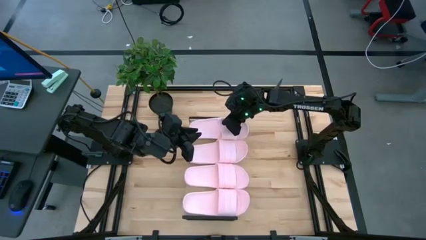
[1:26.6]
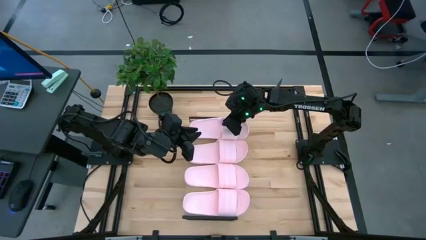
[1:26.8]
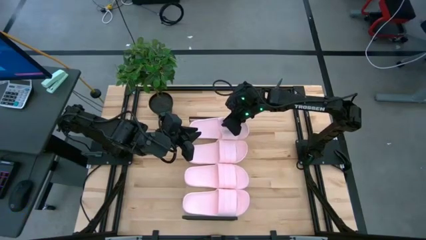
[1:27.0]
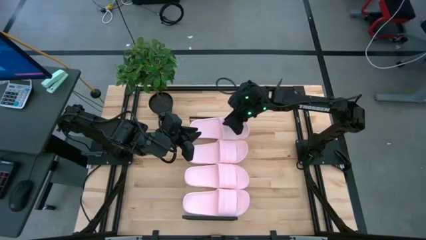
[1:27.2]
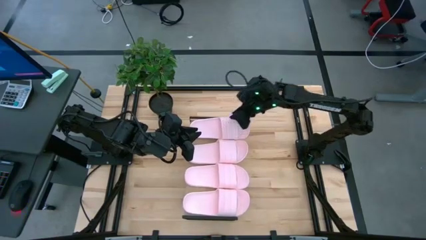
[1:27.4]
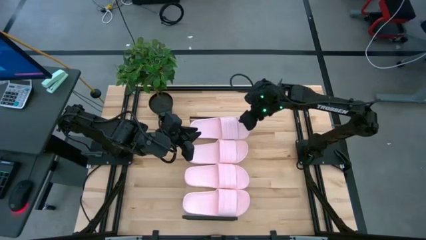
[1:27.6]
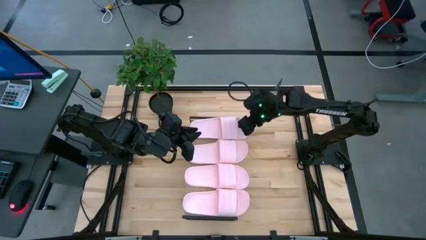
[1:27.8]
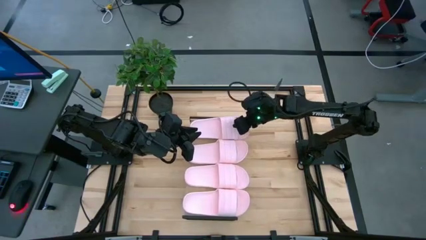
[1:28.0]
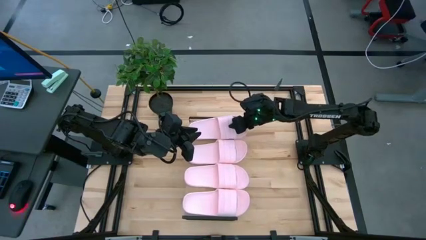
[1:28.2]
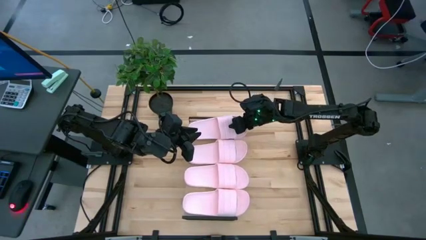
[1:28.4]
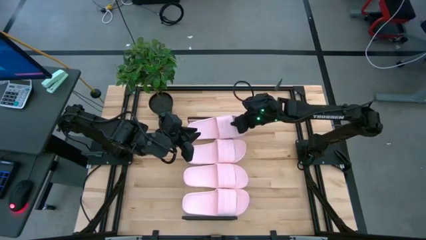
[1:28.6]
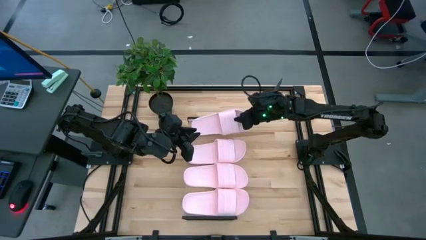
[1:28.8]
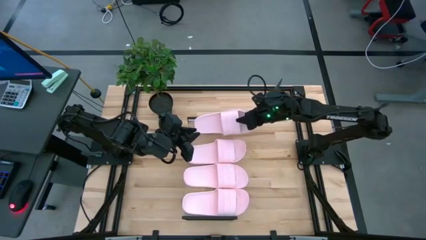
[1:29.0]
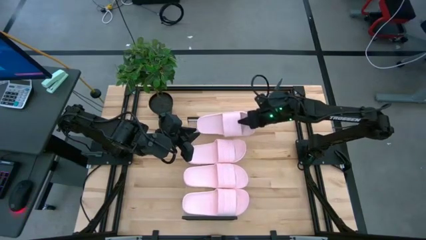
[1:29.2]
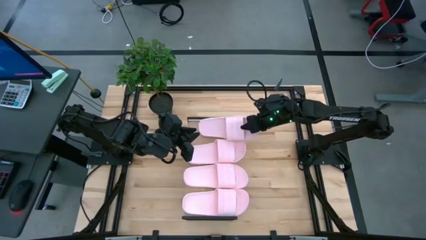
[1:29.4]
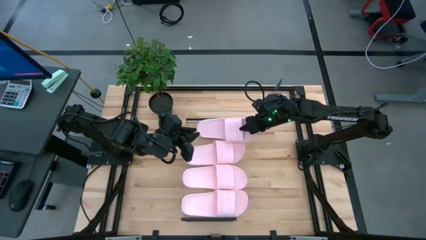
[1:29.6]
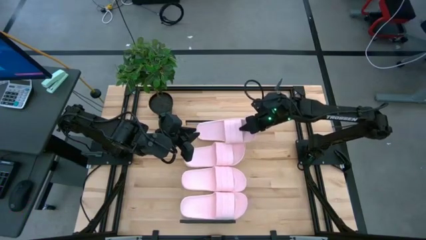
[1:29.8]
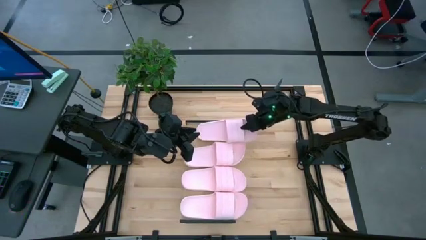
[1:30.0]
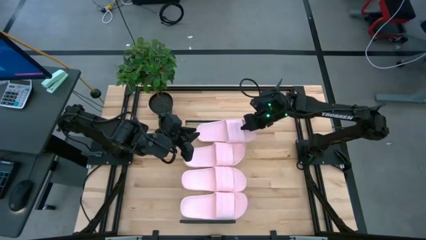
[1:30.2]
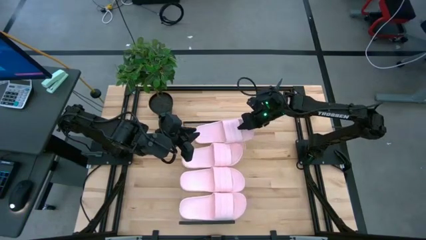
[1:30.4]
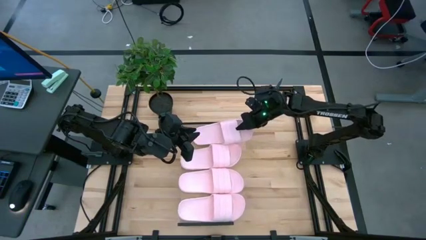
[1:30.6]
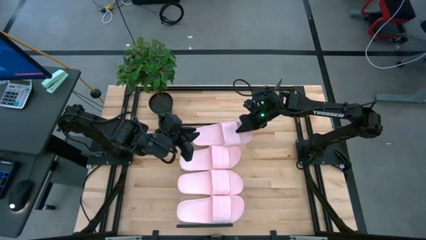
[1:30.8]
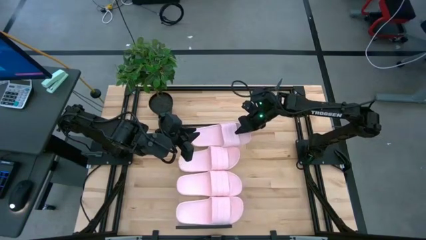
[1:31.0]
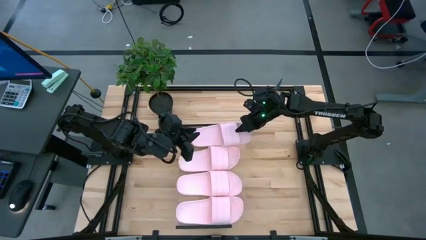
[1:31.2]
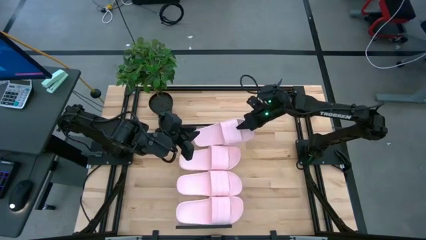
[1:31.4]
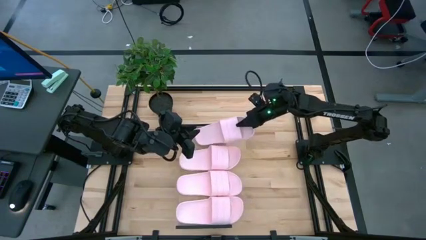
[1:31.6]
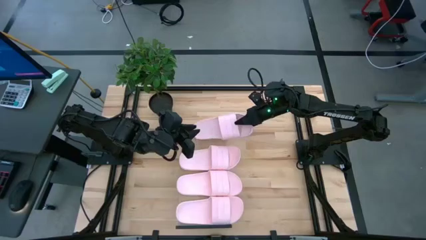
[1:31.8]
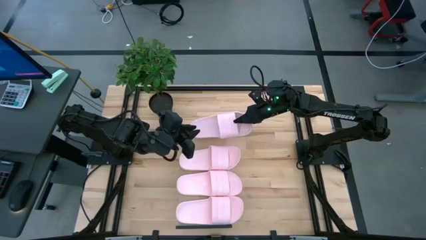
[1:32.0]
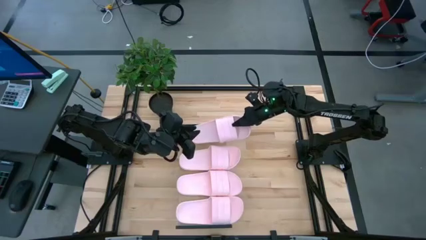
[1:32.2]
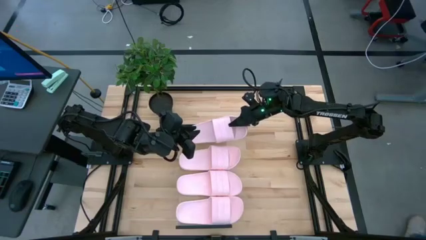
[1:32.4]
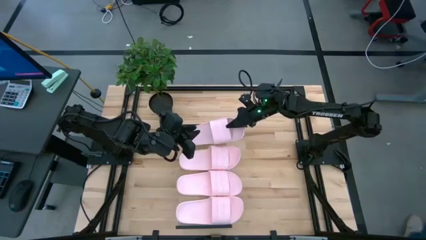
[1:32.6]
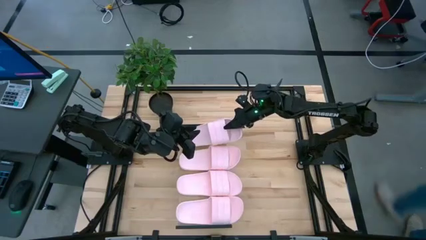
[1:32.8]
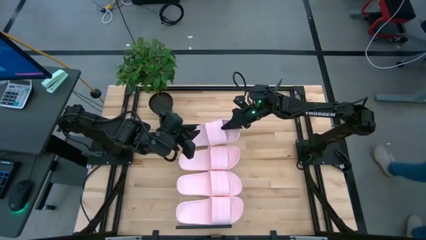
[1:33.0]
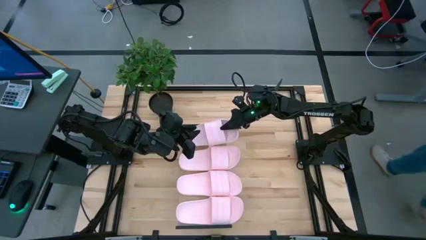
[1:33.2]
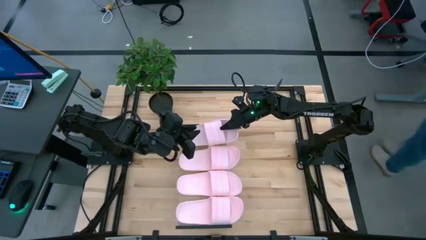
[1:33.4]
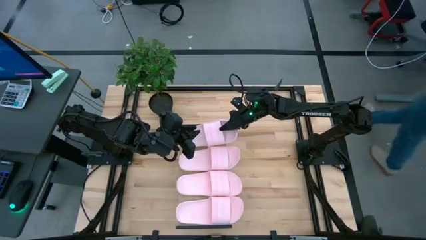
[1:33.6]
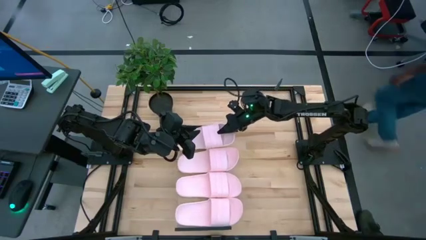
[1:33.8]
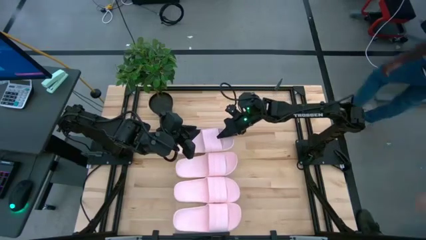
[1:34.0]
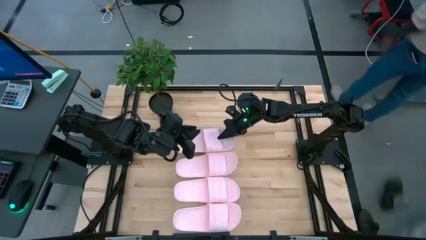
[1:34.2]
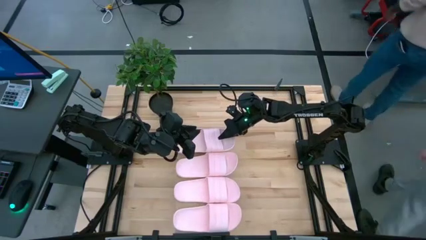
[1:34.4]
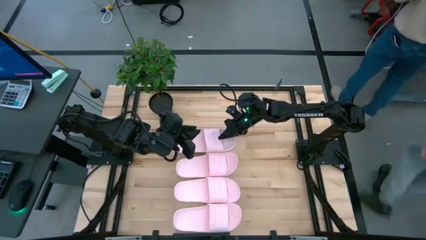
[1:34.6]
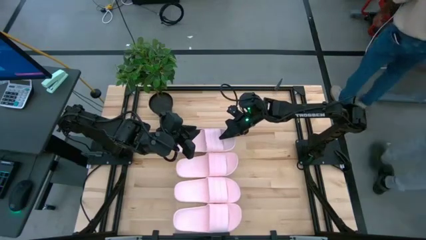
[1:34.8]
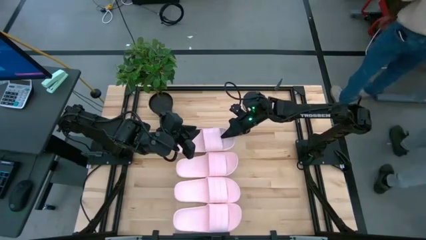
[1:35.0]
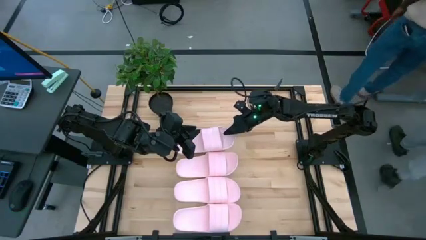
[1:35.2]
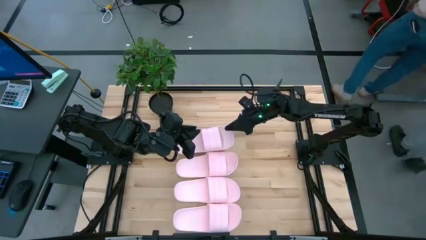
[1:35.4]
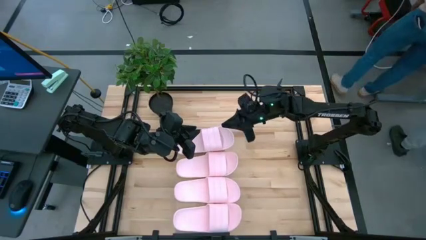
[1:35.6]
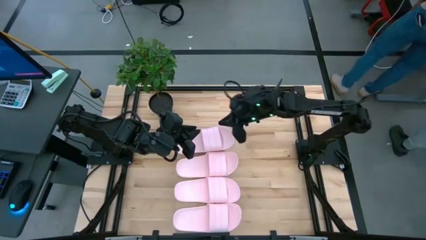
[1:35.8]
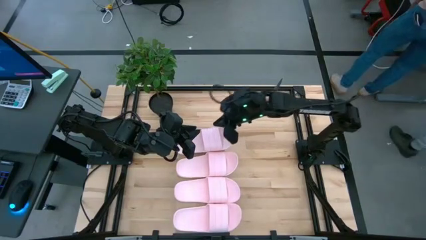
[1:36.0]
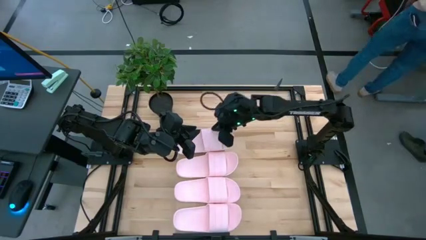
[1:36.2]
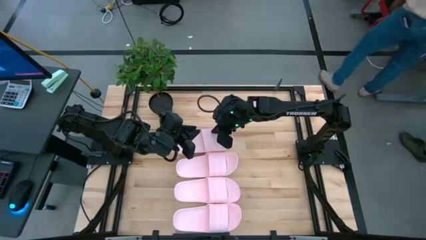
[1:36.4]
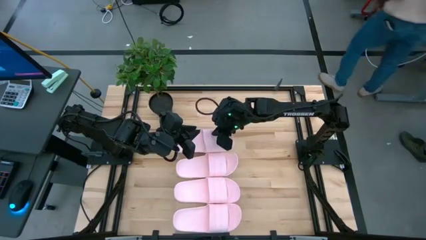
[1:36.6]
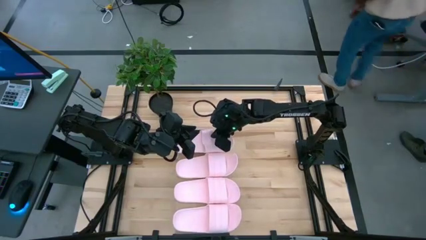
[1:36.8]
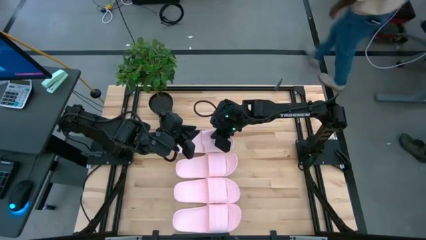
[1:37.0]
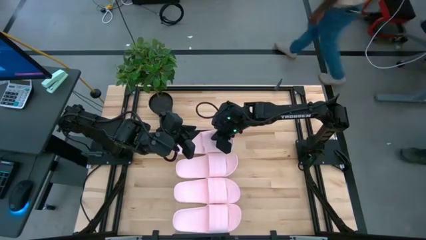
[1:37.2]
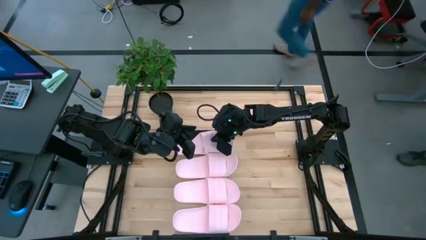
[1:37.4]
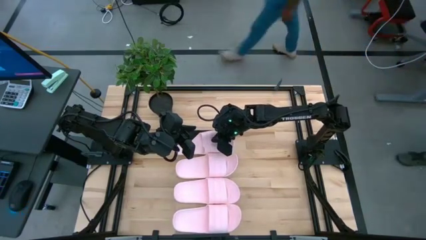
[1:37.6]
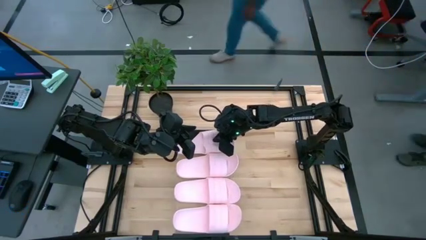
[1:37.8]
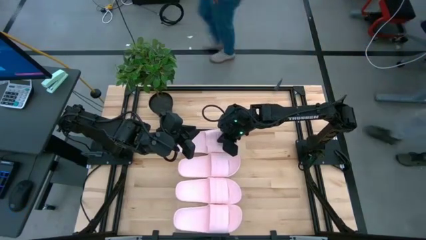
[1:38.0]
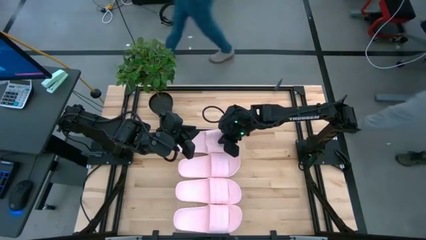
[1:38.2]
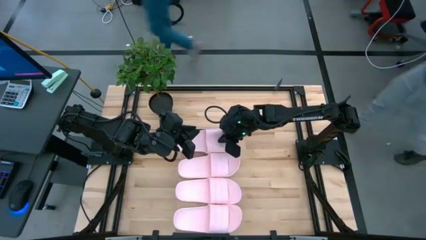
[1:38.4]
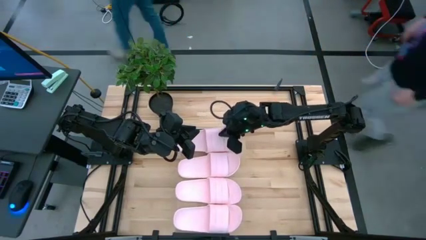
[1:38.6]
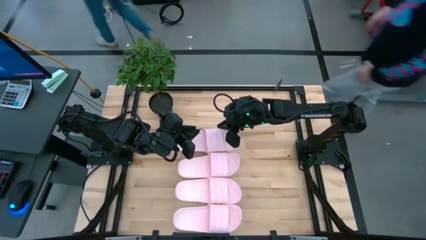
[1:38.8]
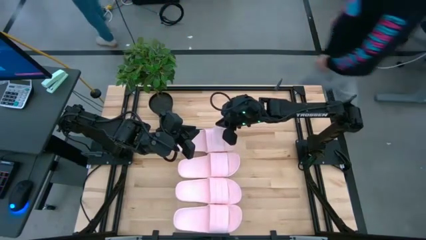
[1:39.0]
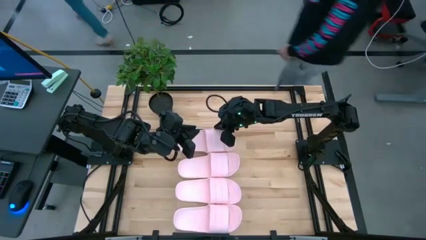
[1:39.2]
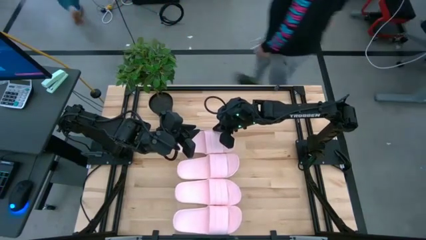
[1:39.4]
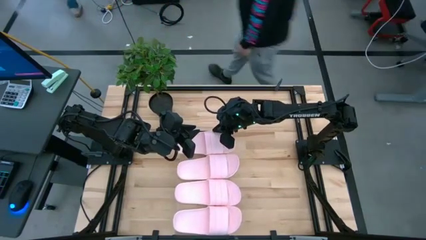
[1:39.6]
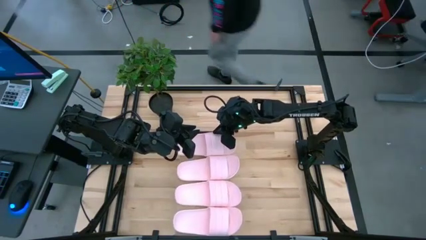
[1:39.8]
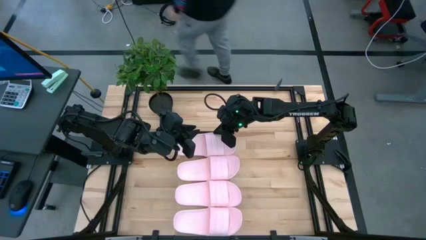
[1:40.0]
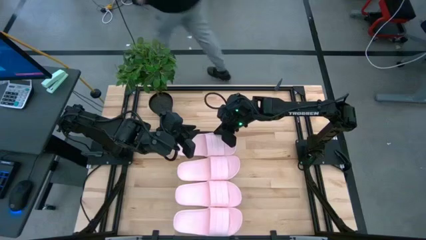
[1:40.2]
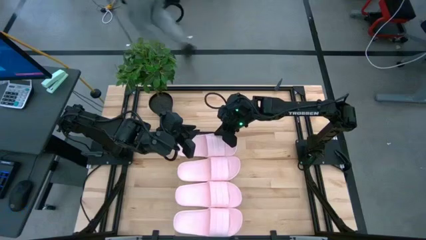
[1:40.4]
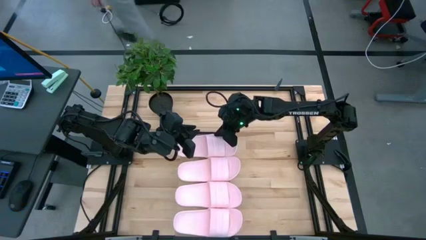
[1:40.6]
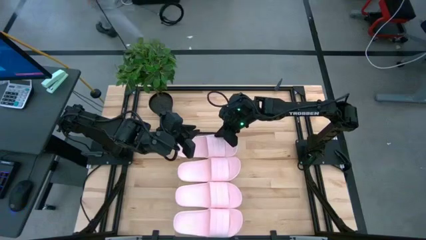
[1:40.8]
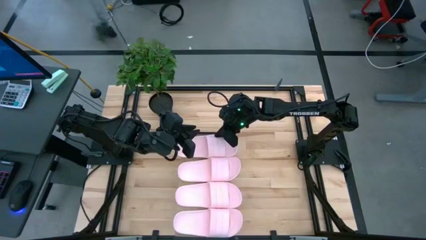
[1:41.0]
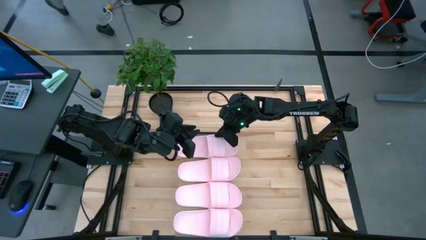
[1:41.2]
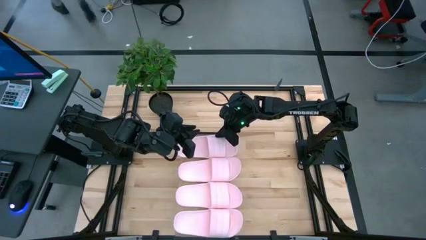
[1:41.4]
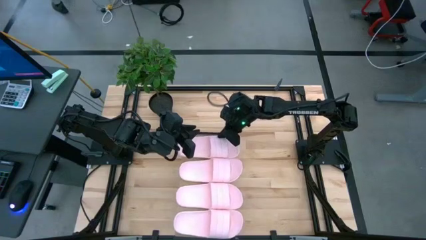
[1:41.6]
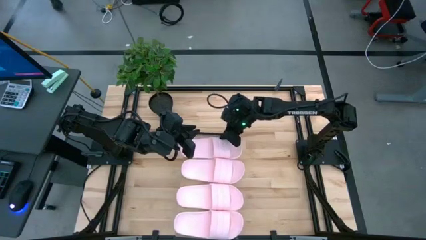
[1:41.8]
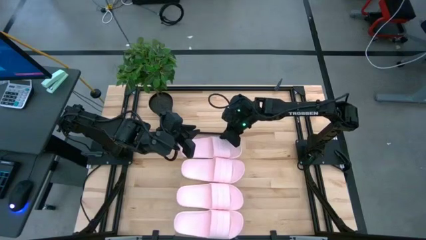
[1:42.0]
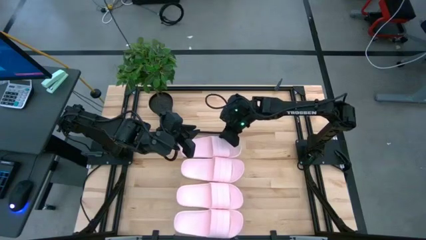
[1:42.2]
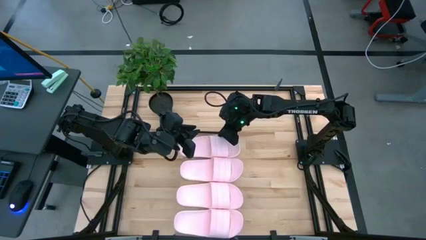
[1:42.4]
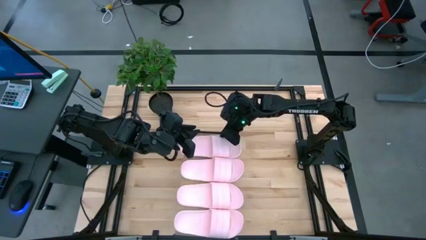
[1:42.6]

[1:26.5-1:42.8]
Task: Pick and place slides into the shelf
Put the pink slipper on the shelf

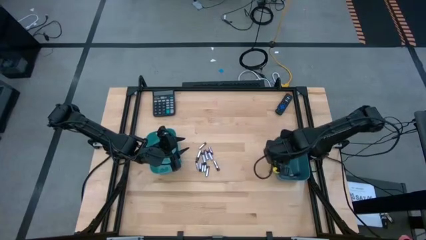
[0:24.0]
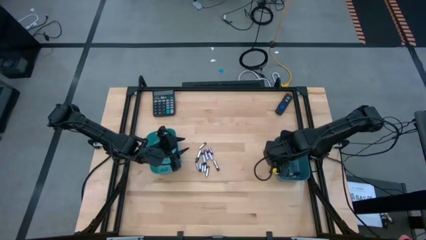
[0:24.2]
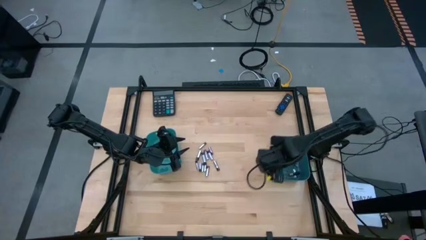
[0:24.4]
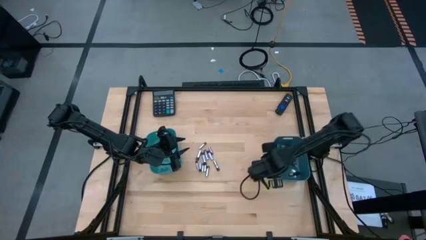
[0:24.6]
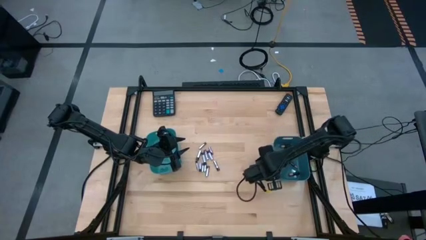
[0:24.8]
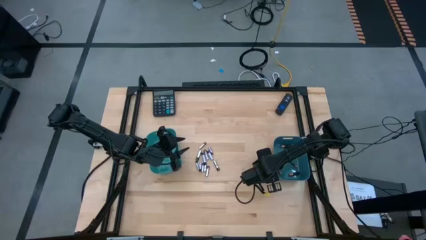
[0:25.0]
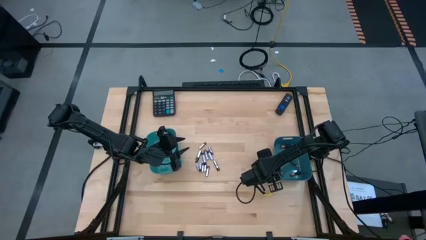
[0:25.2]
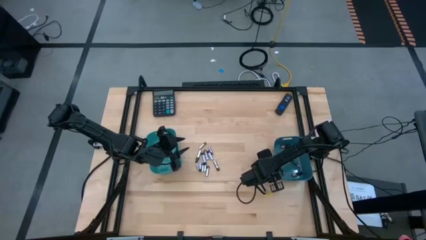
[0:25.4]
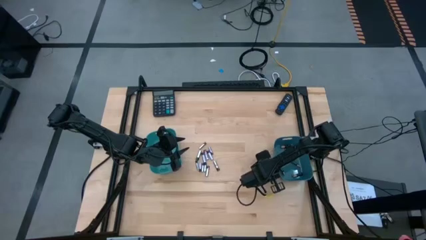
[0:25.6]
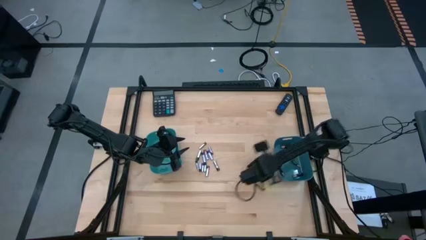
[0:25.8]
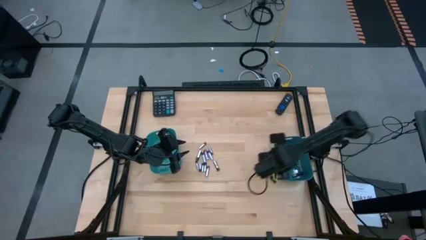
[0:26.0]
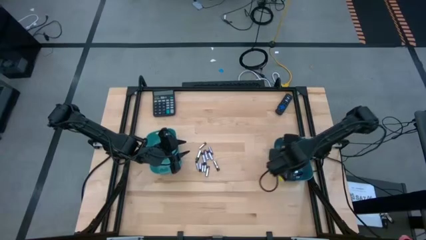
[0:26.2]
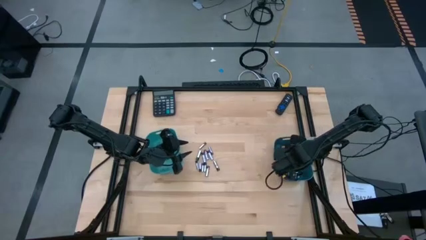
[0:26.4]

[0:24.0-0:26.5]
Task: Sort batteries
Put the black battery into the right blue bin
